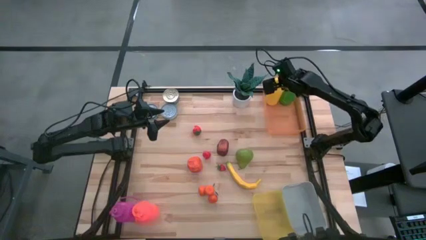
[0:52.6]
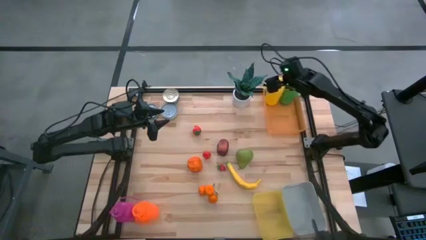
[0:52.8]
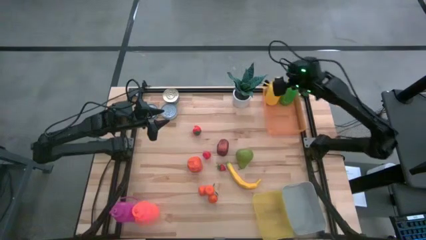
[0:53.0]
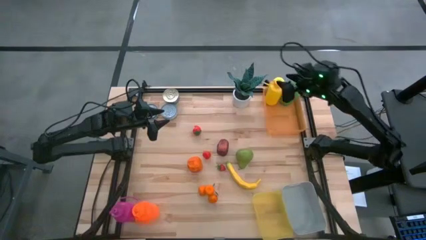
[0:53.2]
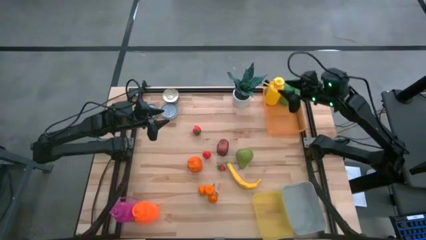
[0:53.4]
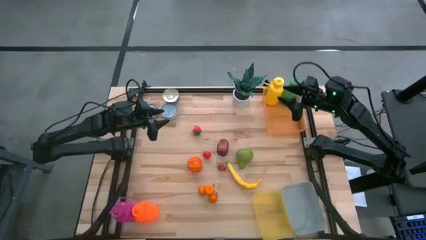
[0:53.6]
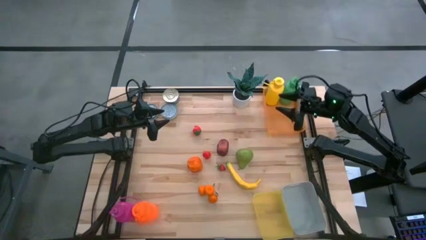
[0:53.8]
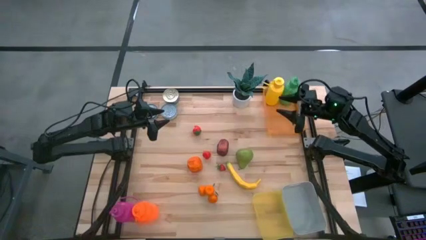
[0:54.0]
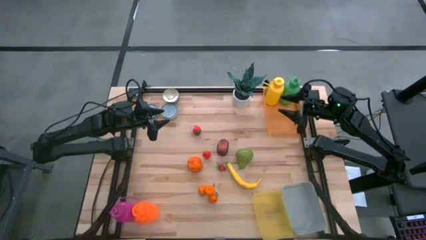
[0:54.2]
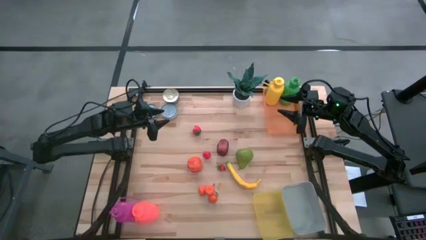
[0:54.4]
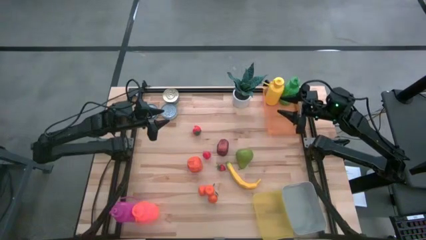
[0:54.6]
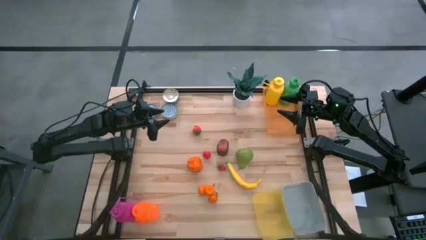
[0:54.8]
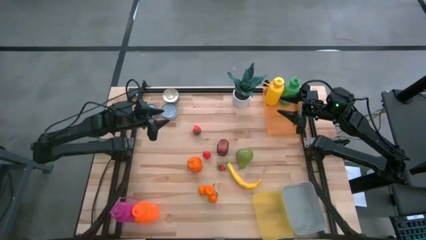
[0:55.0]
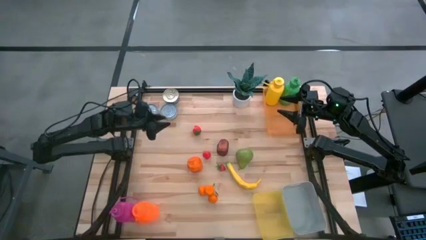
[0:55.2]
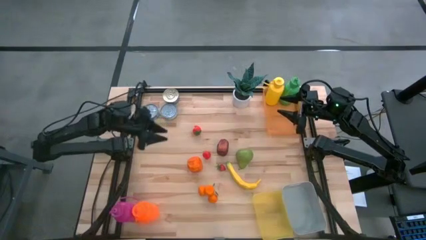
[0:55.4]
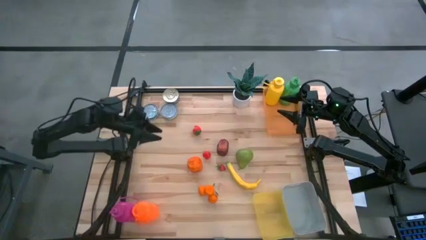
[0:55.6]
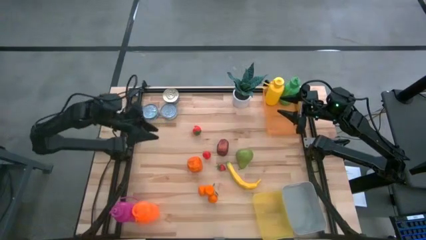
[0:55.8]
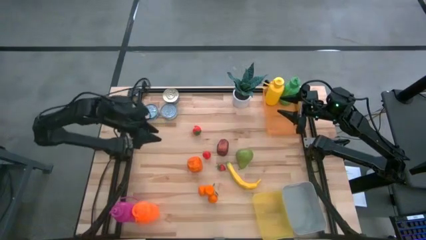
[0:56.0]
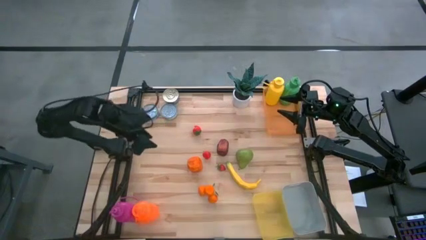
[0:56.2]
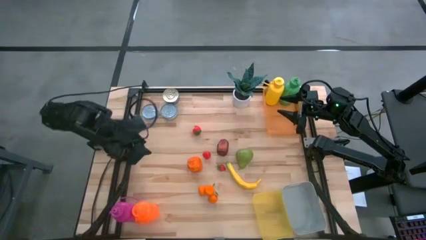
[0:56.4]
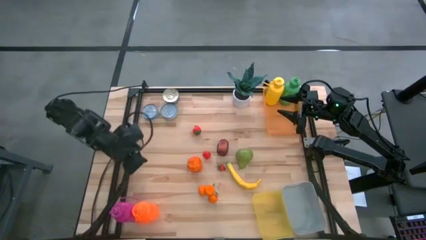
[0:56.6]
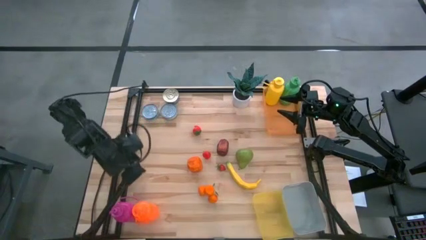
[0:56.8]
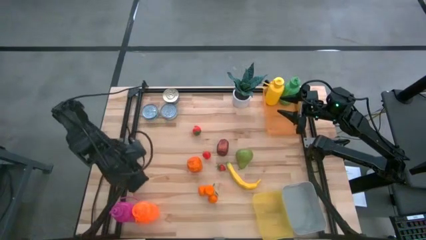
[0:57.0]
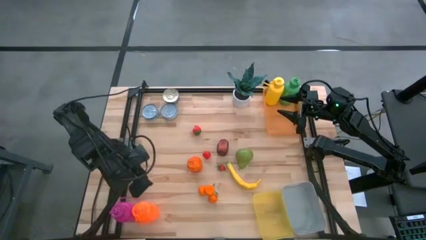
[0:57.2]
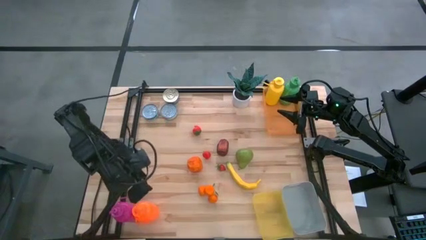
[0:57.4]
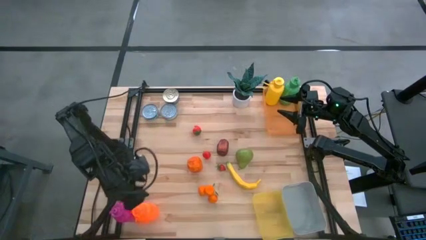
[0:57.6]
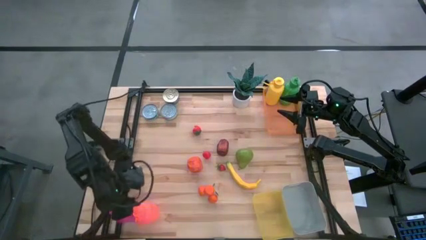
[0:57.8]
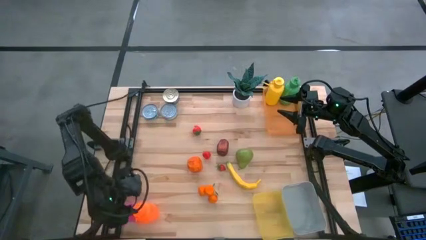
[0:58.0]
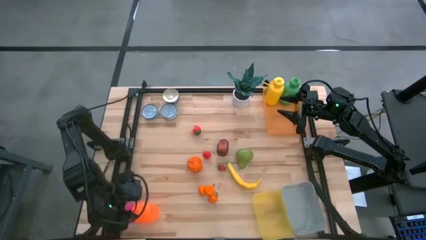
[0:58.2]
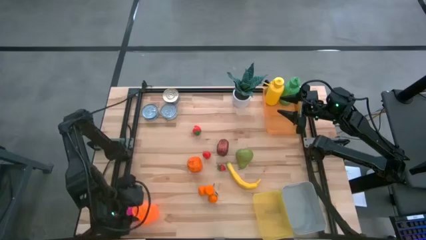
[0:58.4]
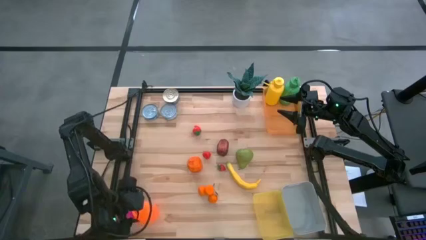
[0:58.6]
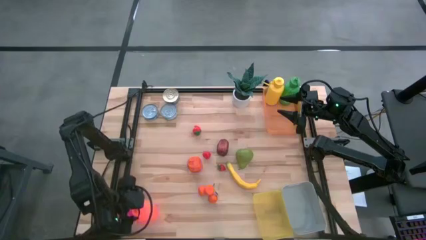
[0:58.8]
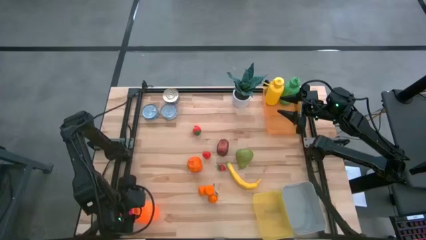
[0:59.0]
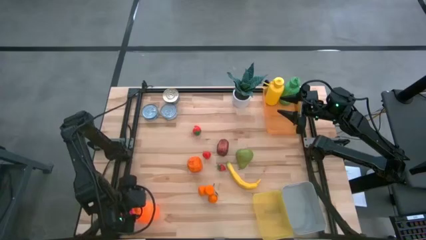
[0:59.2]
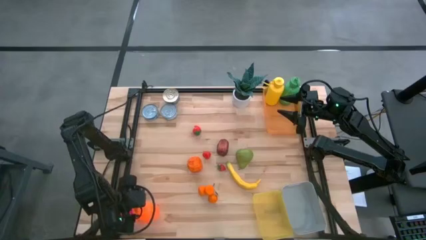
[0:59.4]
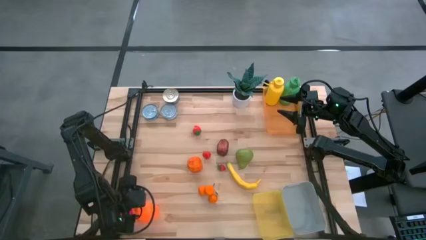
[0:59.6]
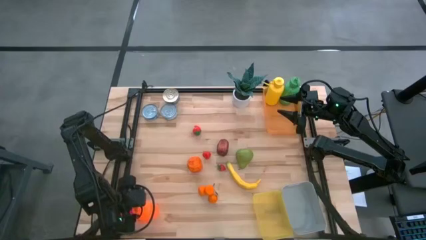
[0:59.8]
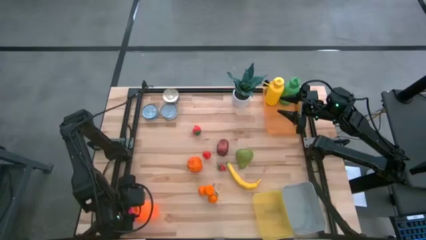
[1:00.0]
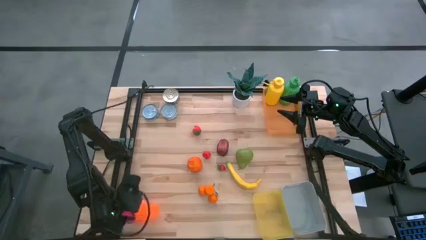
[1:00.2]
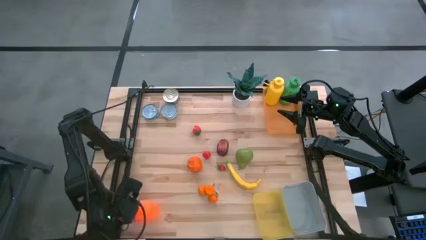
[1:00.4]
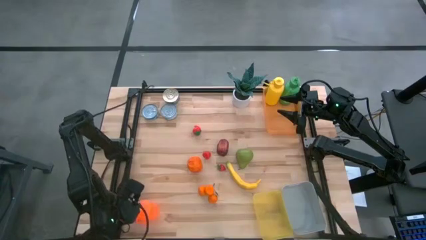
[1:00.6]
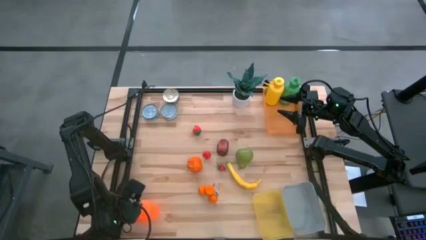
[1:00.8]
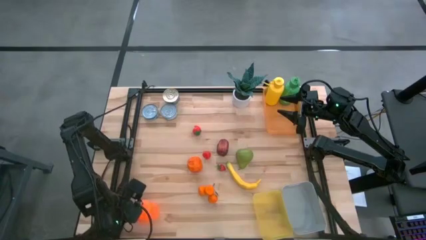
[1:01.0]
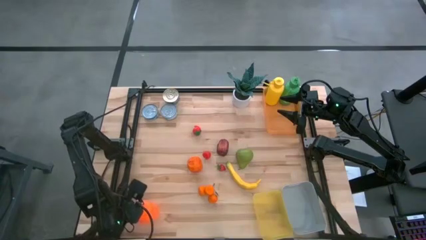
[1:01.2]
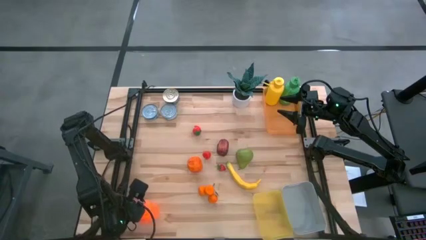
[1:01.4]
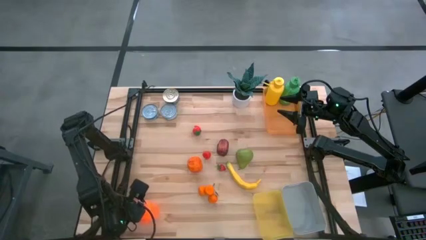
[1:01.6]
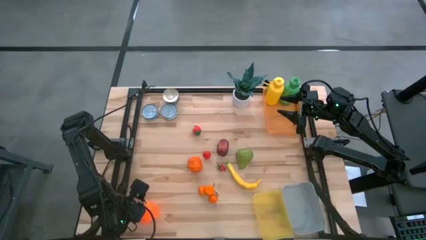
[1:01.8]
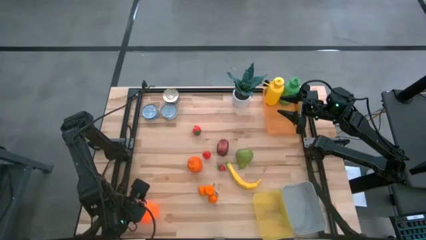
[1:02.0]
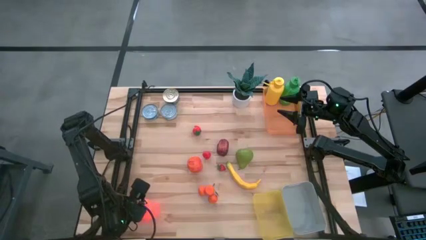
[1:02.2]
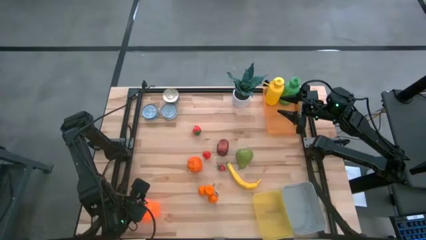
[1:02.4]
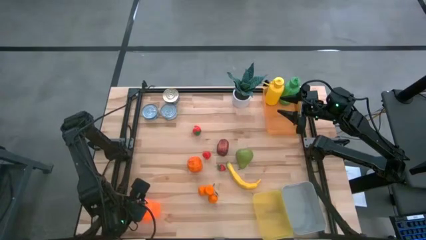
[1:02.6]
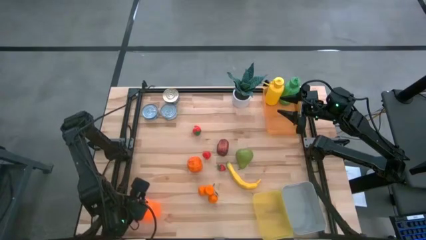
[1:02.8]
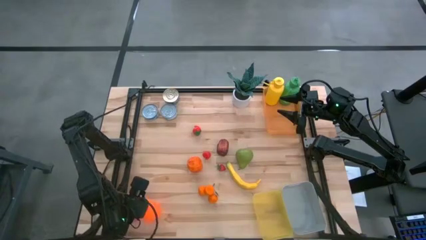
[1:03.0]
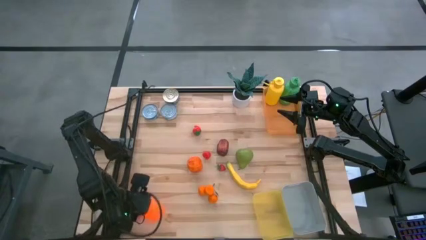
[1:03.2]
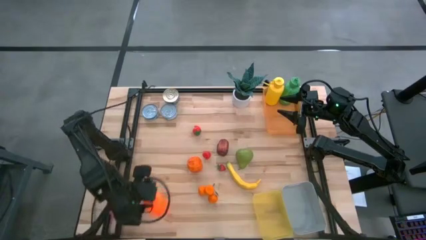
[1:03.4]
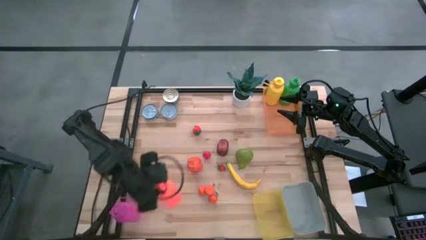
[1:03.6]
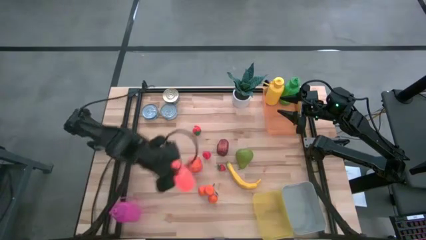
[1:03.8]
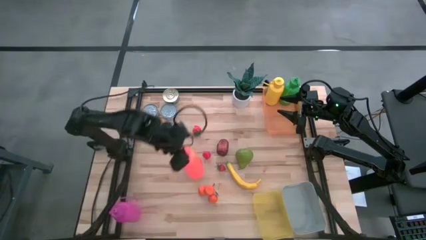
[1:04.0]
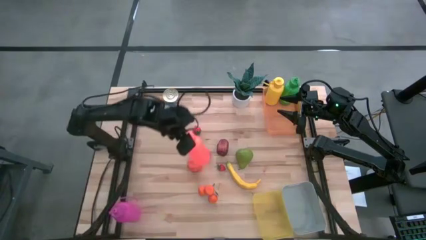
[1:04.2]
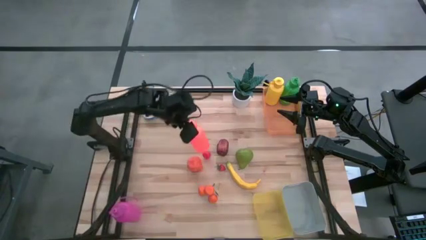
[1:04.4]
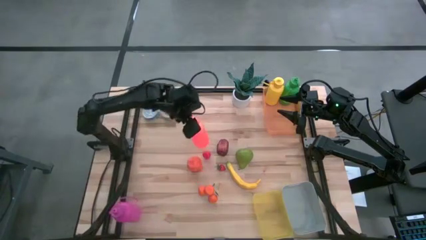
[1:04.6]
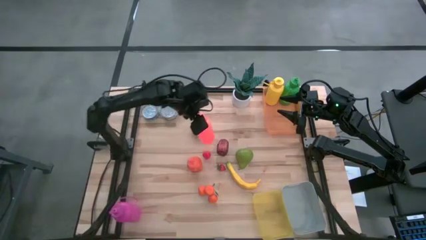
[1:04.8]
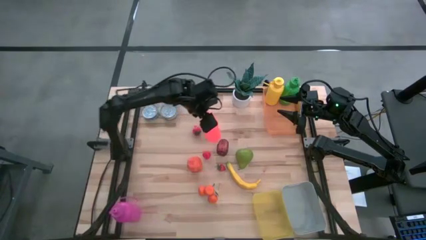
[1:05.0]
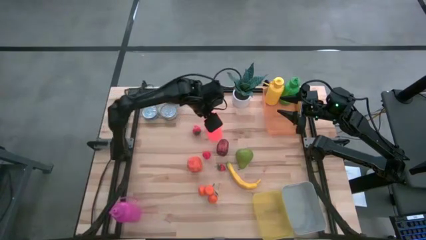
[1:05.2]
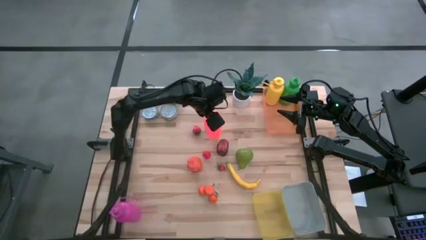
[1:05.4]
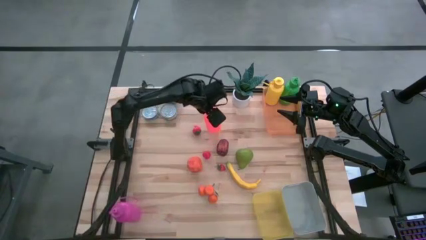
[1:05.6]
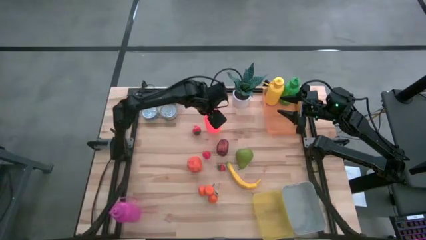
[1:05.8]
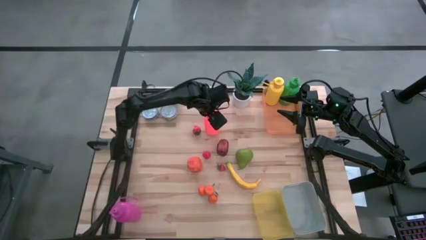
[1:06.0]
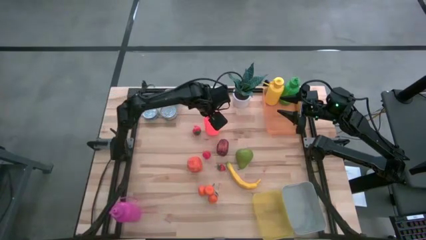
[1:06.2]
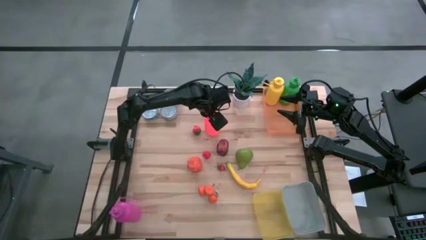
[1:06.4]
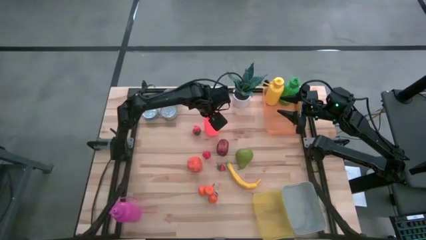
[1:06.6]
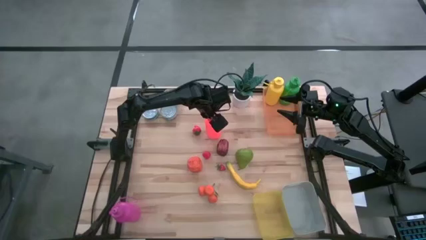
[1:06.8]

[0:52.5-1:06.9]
Task: Pick & Place Food Item
Put the orange water bottle into the orange bin
